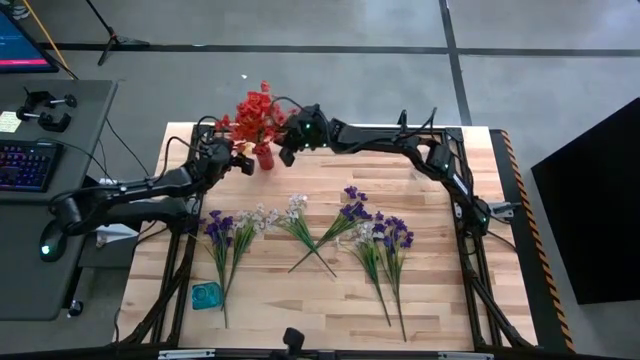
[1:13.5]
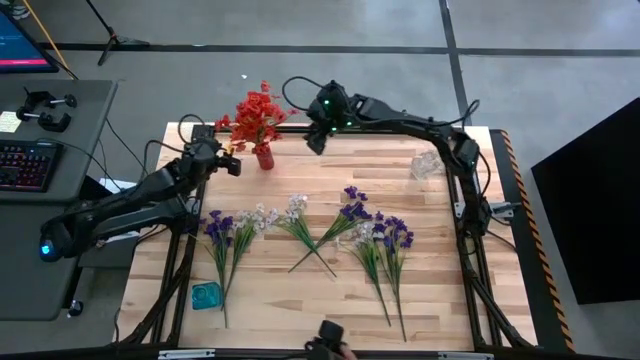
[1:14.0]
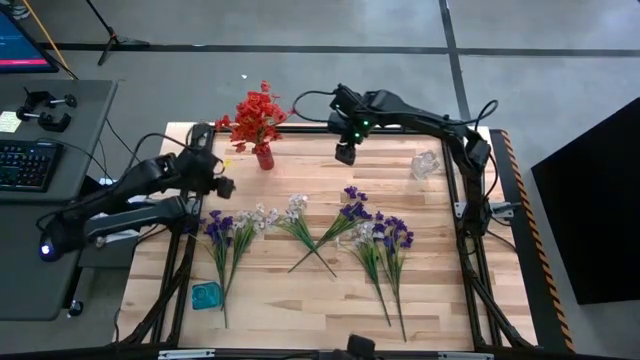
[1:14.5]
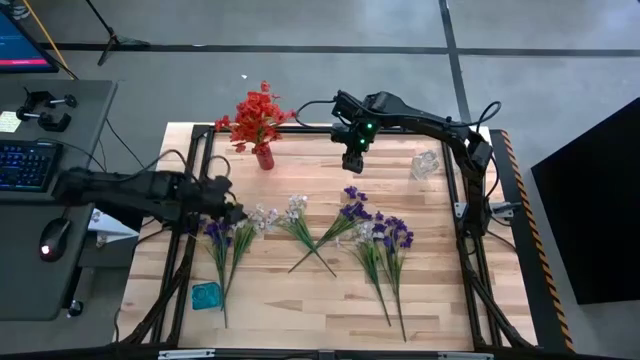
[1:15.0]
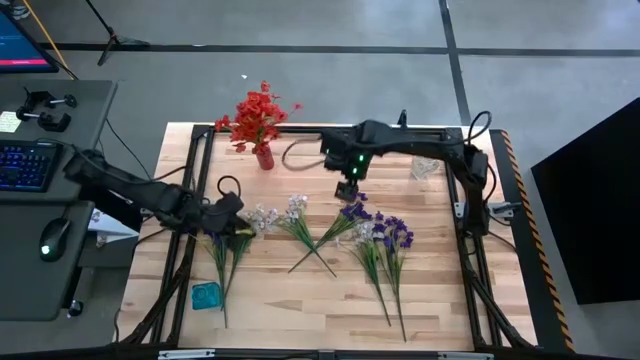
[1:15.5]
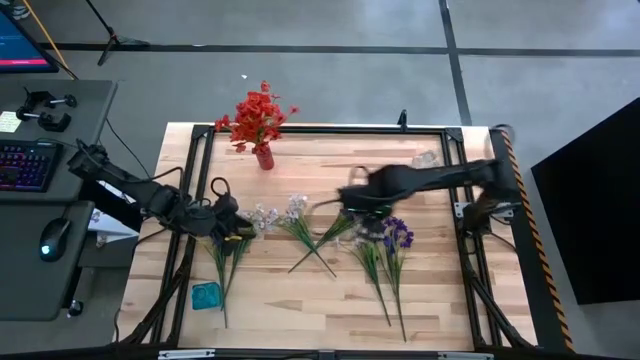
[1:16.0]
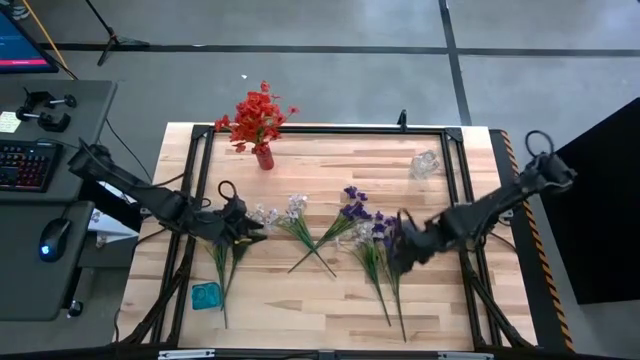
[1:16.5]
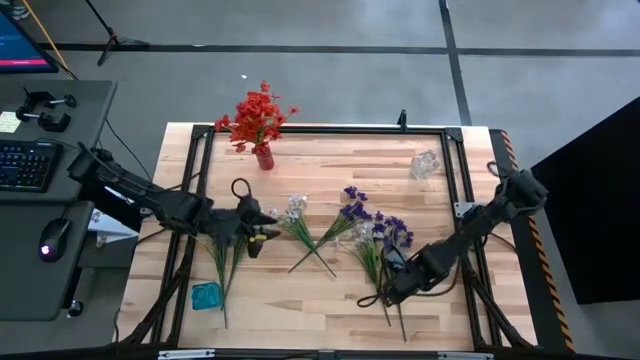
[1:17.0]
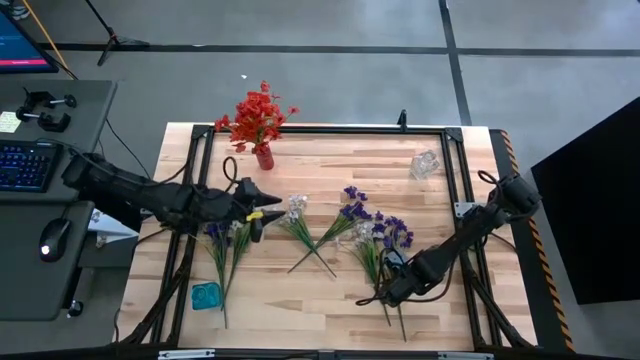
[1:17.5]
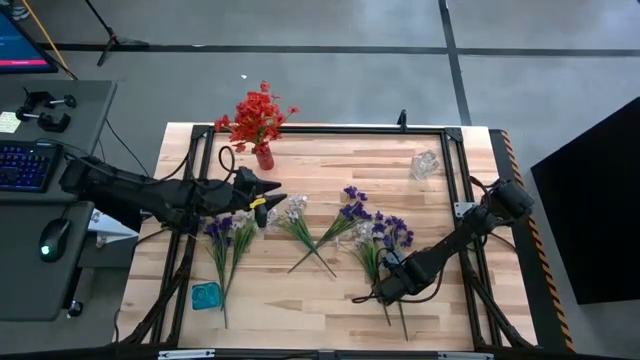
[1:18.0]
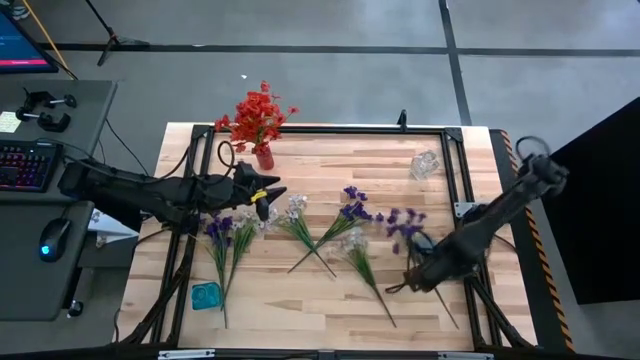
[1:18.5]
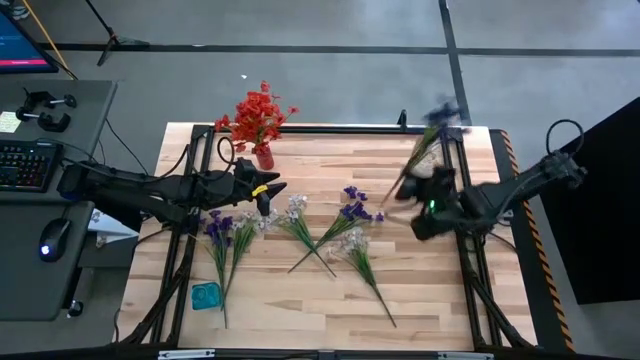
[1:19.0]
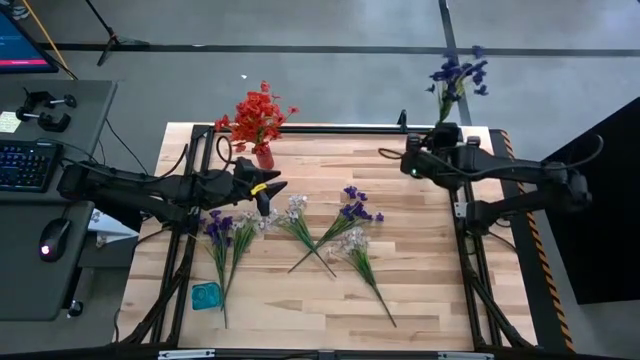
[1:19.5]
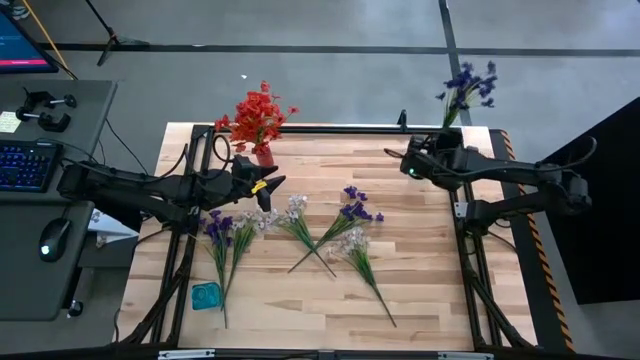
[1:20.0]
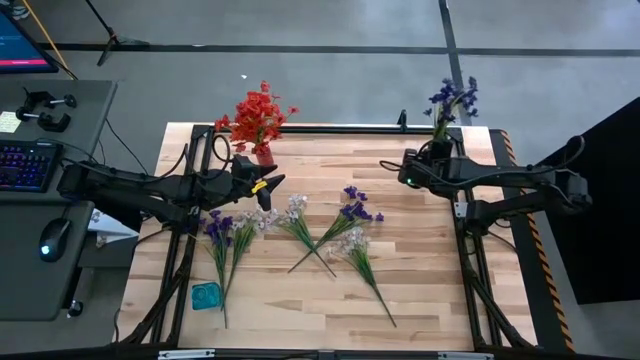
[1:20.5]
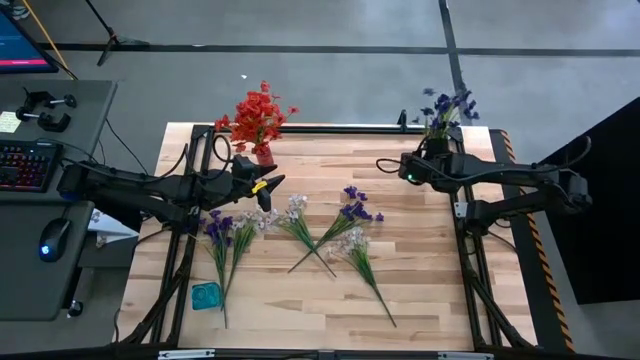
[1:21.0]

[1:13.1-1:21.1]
Task: Sort flowers into vase by color
Put the right violet flowers into the transparent vase

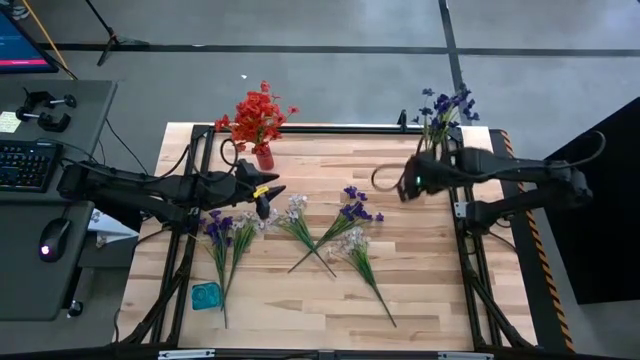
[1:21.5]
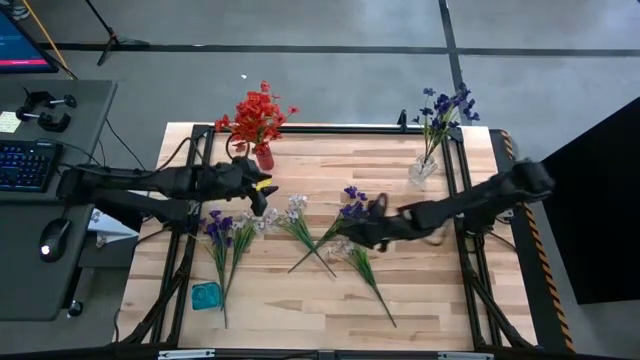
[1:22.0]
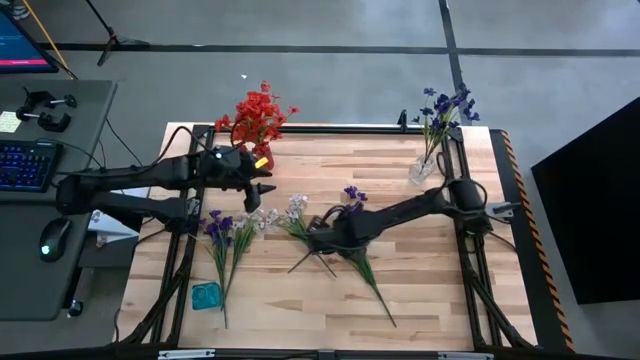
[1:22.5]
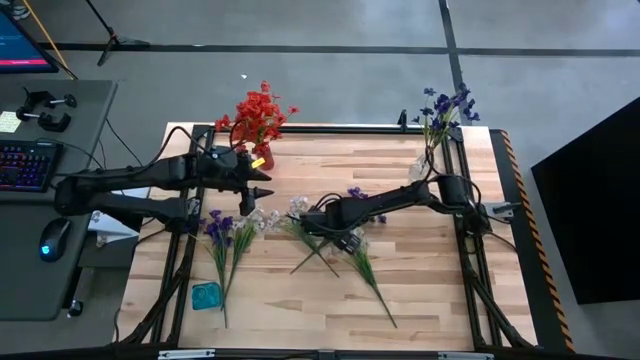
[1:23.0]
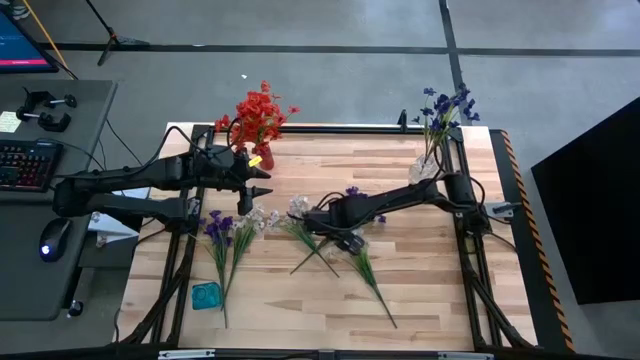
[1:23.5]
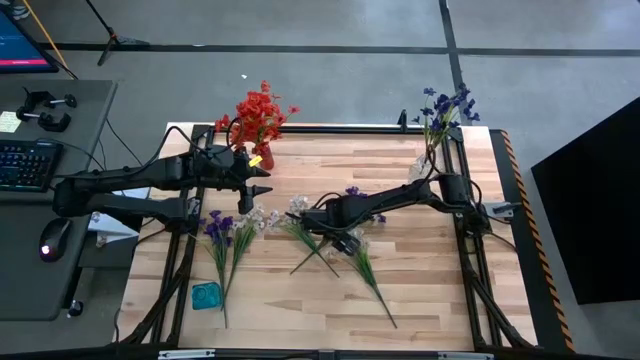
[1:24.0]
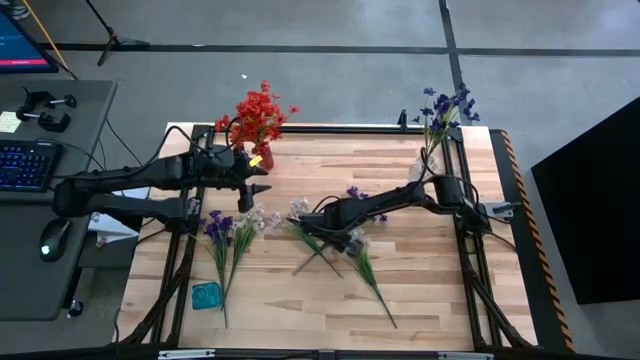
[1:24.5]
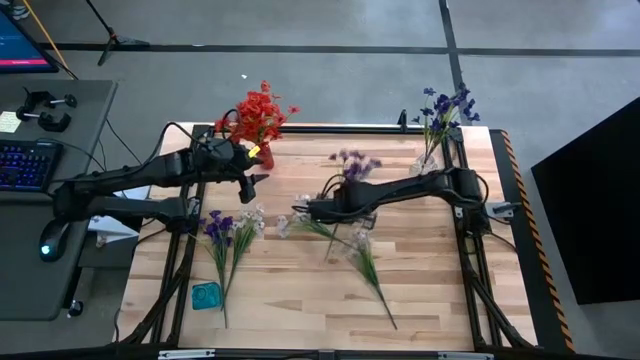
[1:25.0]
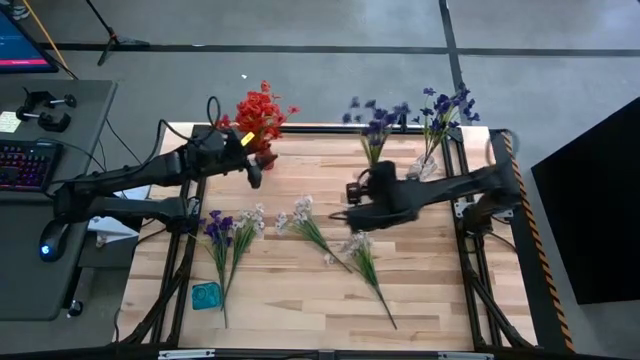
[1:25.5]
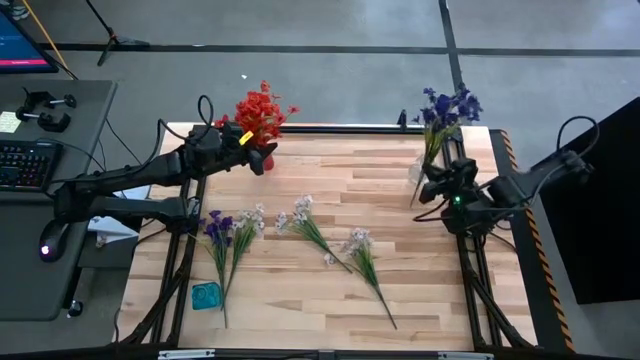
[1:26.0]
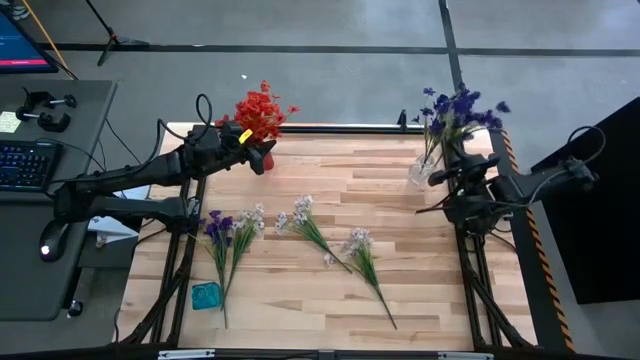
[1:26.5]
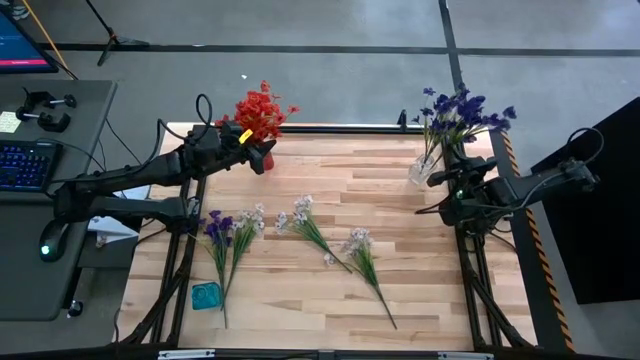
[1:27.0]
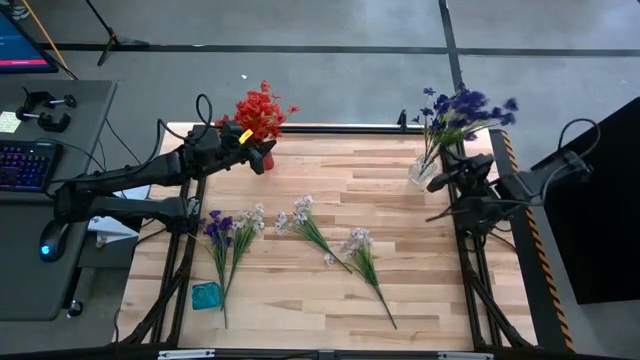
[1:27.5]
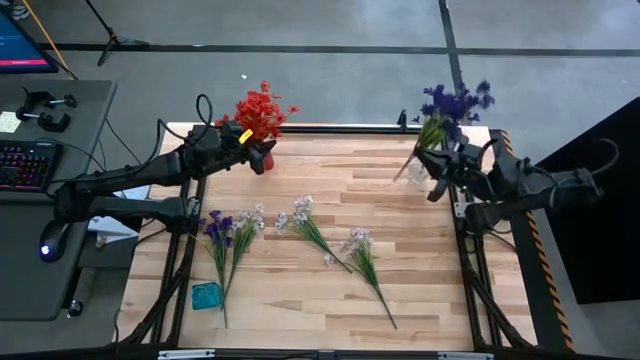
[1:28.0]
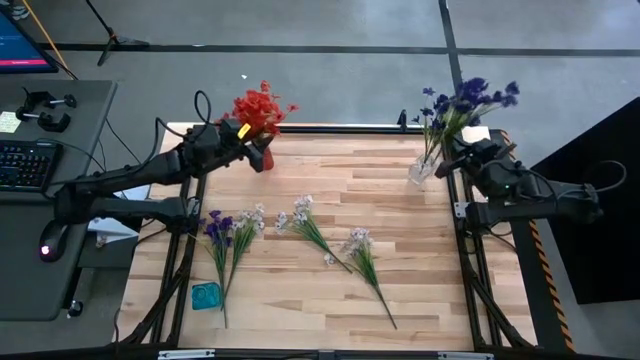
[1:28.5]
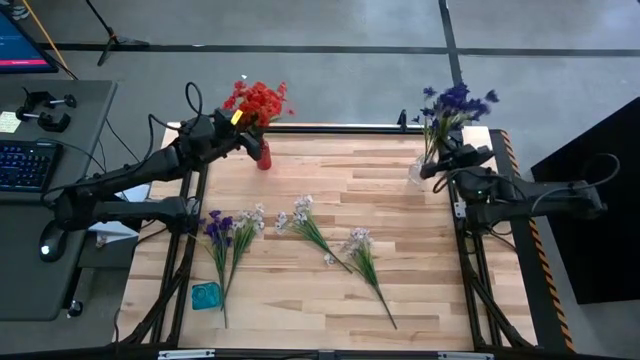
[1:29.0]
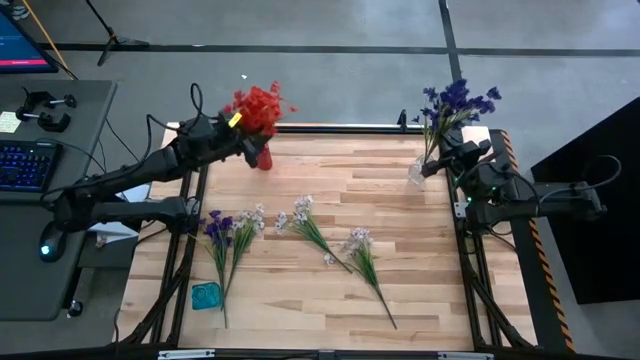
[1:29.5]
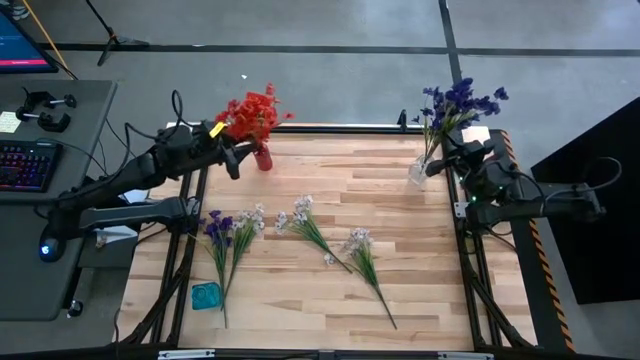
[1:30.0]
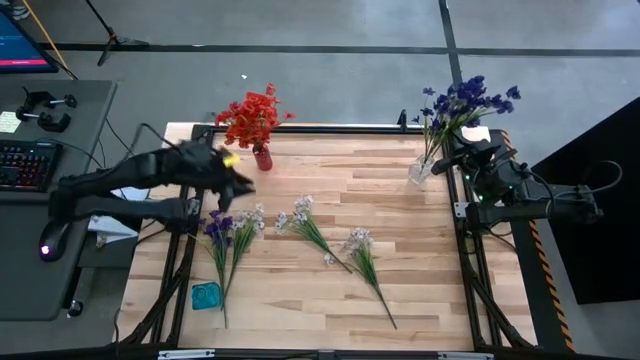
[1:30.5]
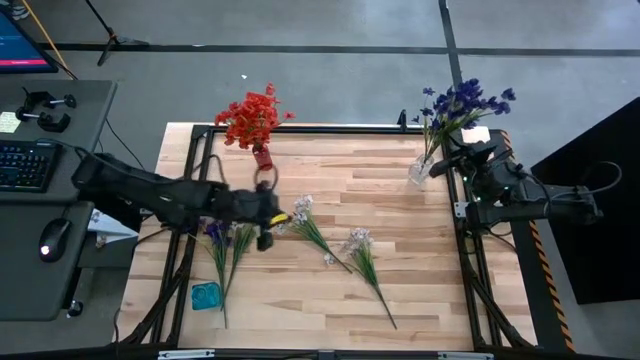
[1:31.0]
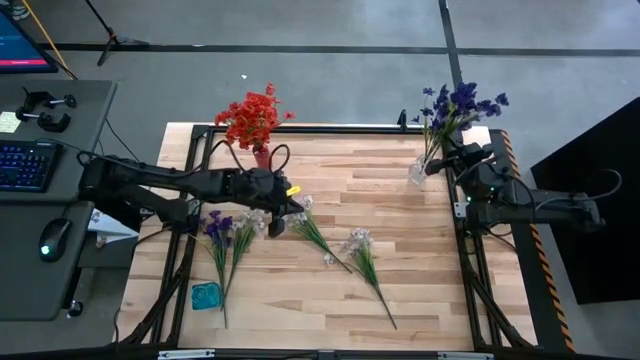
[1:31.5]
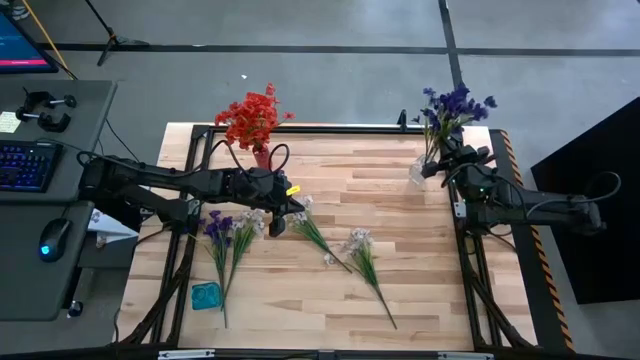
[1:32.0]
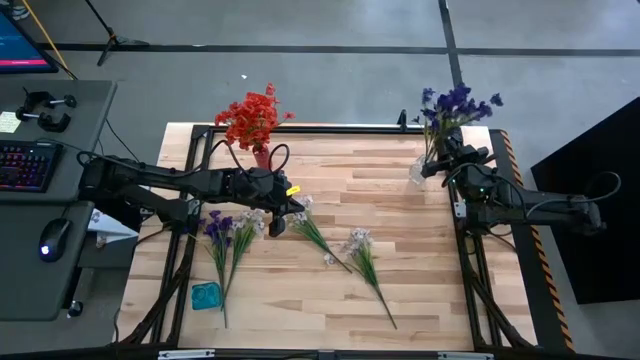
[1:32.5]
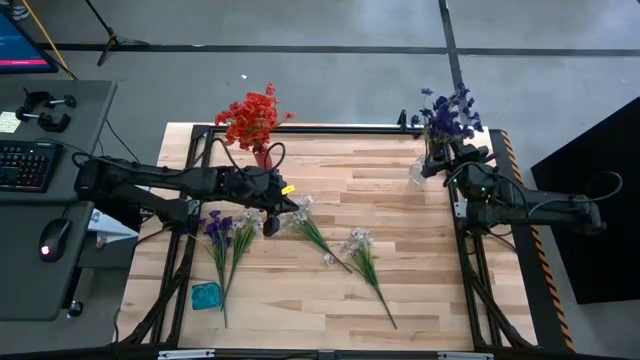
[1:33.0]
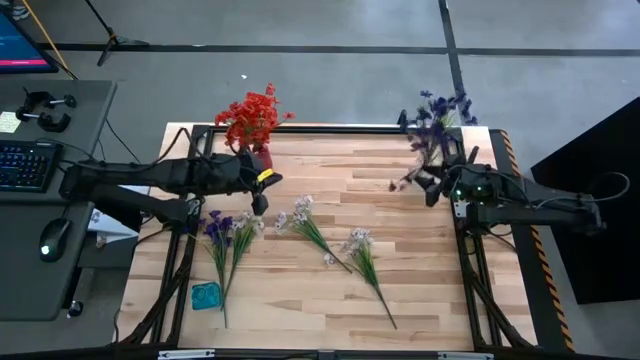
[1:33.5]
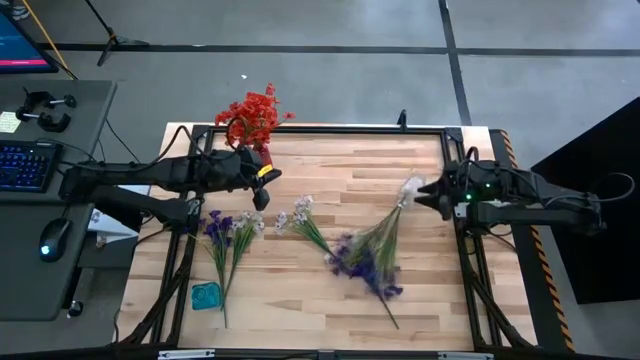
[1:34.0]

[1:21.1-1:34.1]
Put the right purple flowers into the transparent vase

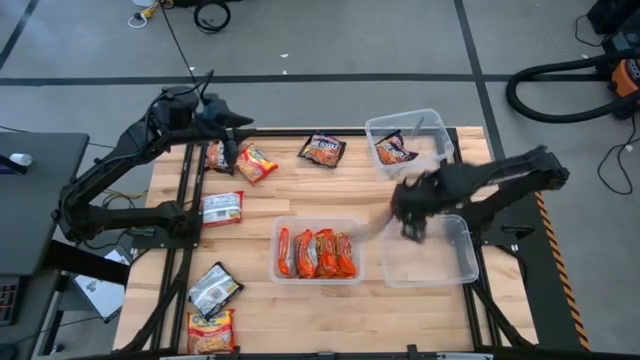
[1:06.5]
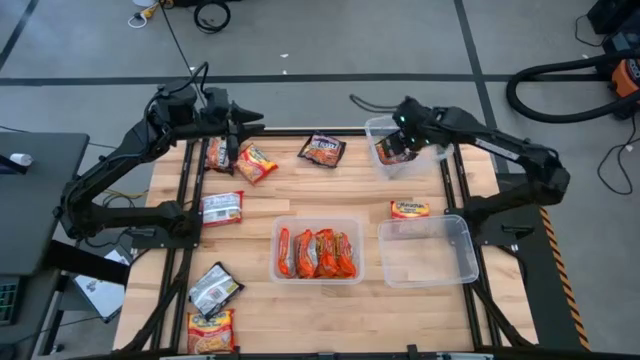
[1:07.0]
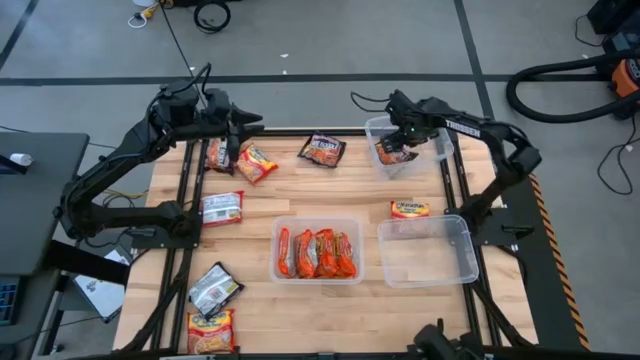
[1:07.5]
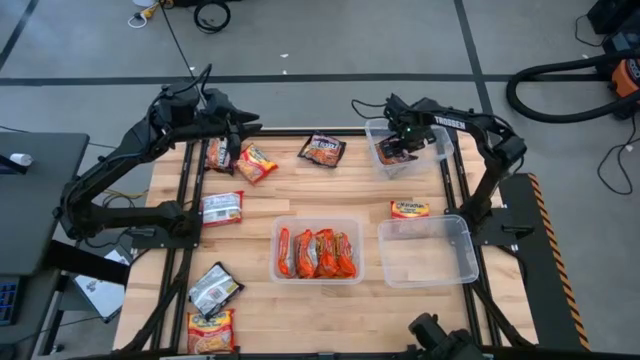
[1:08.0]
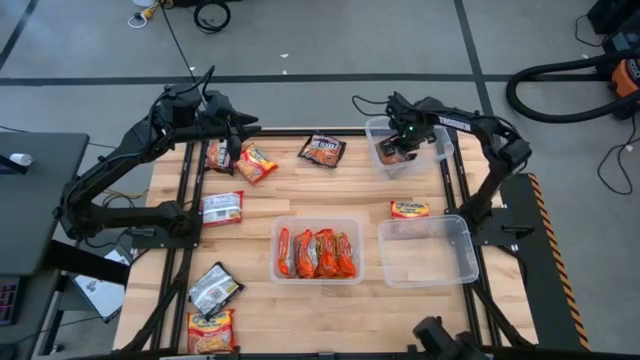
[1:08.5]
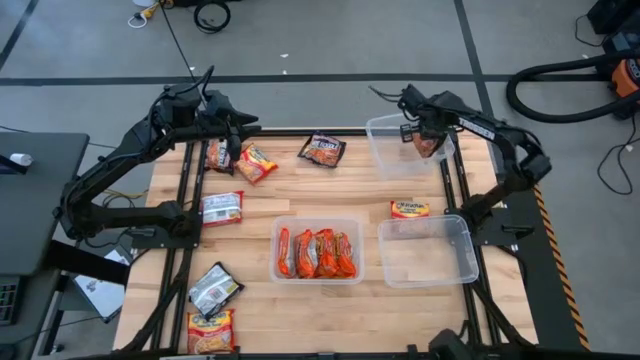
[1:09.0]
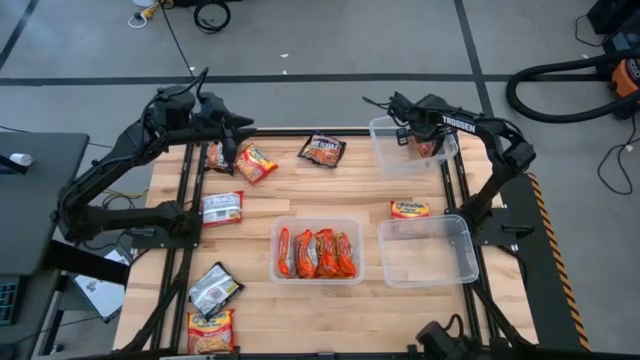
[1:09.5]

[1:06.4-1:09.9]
Task: Sort Maruchan noodles
Adjust the black noodle pack in the top transparent bin
